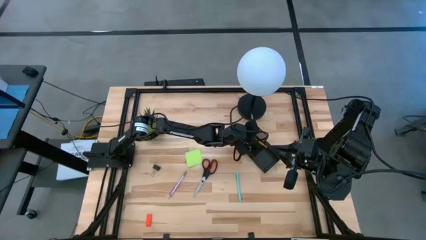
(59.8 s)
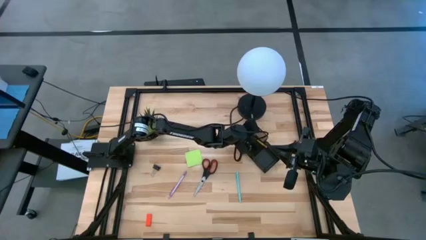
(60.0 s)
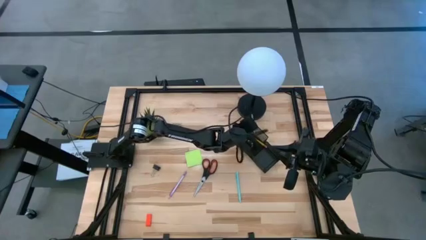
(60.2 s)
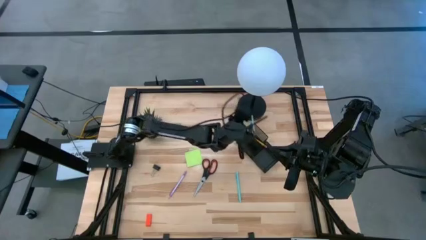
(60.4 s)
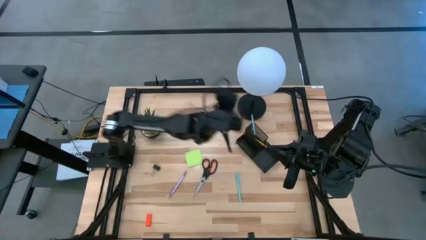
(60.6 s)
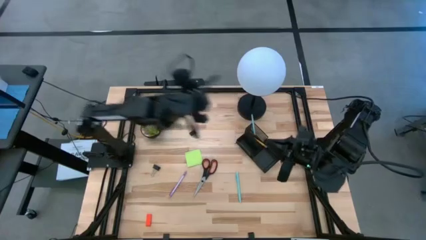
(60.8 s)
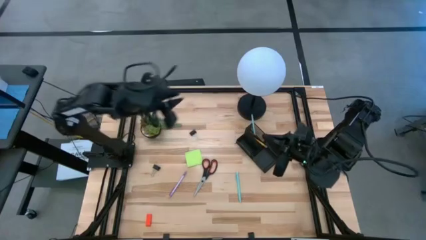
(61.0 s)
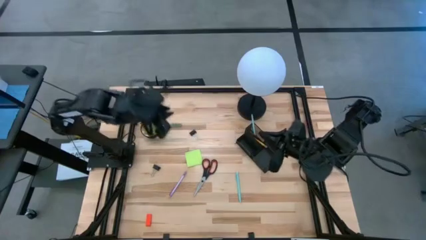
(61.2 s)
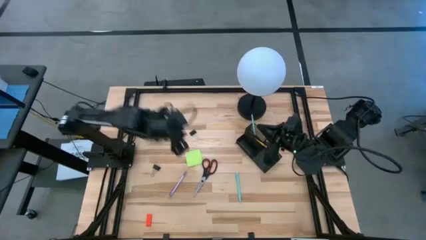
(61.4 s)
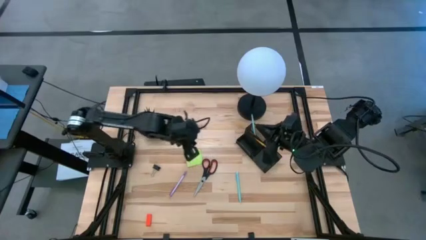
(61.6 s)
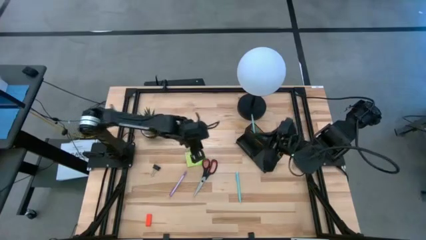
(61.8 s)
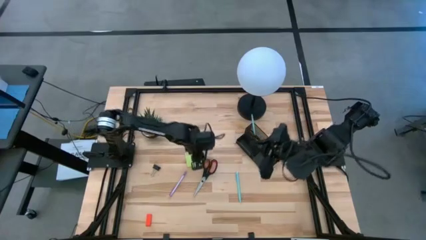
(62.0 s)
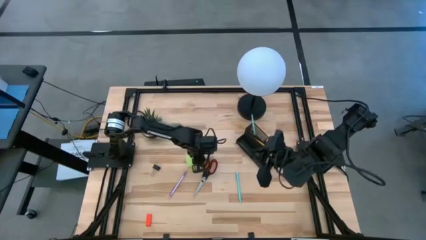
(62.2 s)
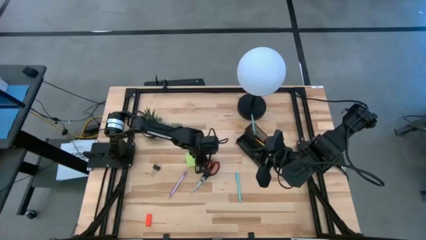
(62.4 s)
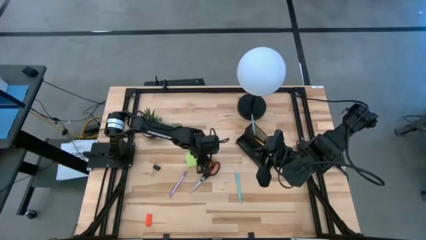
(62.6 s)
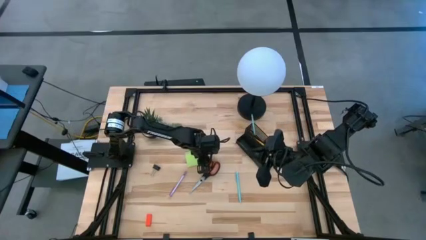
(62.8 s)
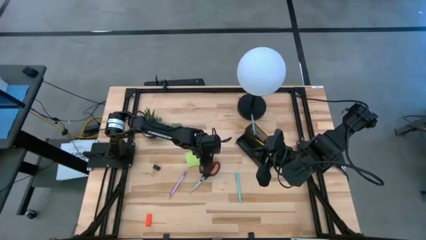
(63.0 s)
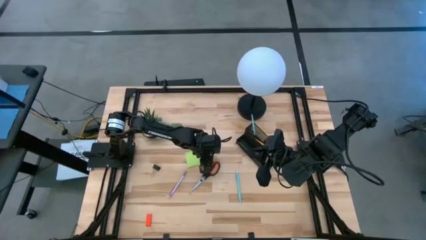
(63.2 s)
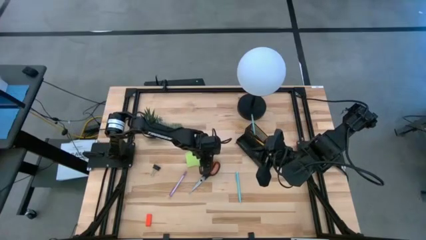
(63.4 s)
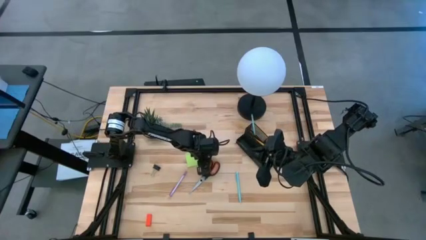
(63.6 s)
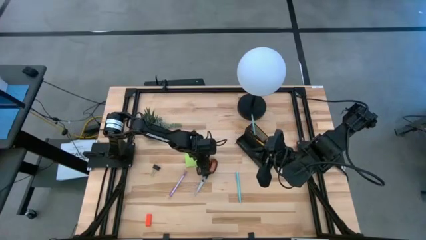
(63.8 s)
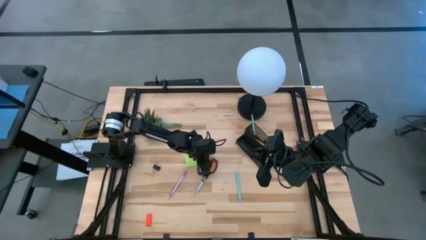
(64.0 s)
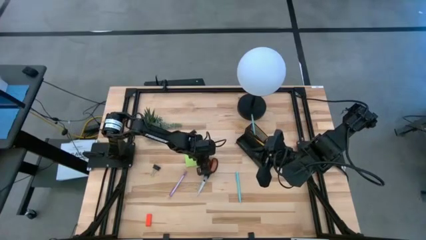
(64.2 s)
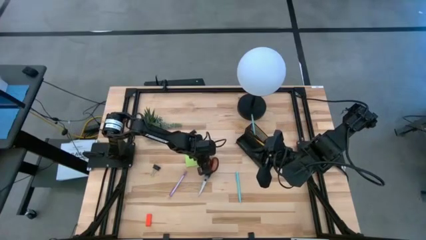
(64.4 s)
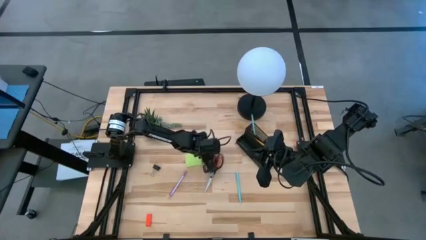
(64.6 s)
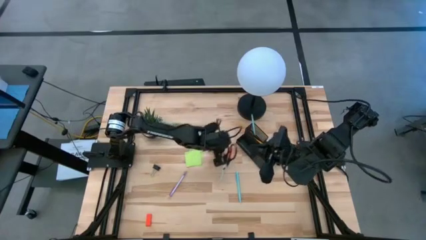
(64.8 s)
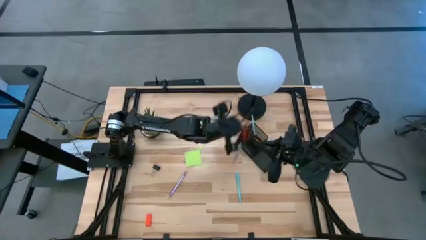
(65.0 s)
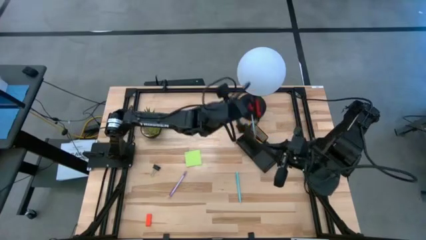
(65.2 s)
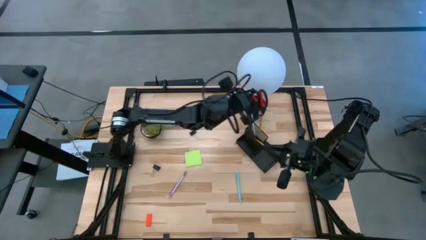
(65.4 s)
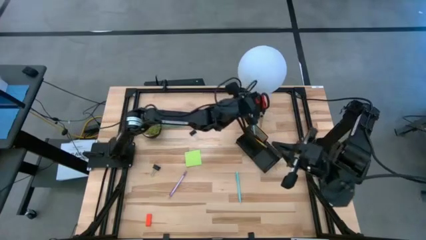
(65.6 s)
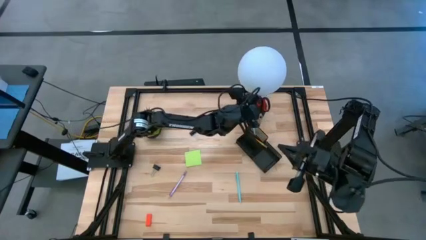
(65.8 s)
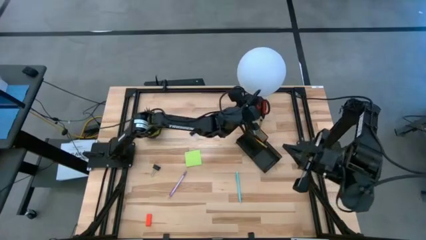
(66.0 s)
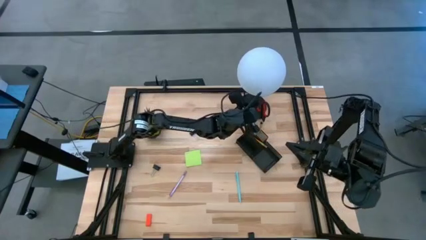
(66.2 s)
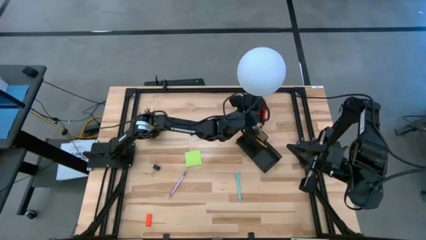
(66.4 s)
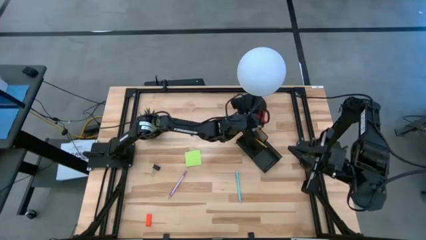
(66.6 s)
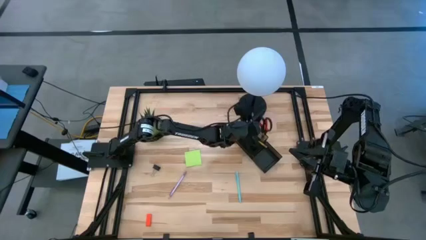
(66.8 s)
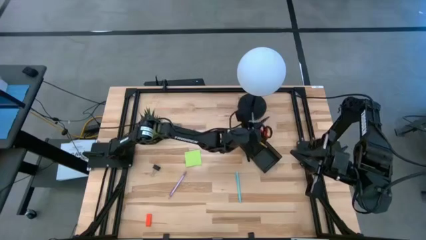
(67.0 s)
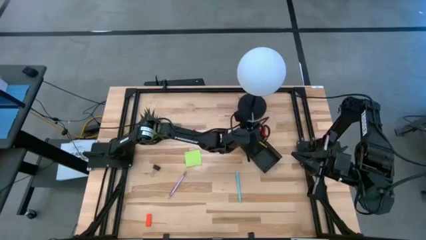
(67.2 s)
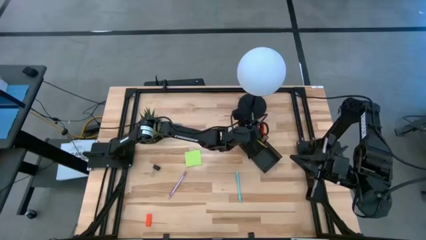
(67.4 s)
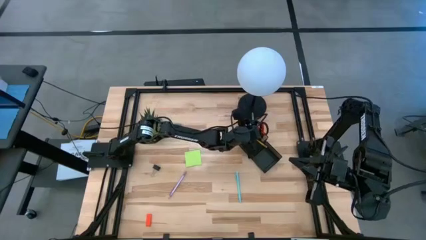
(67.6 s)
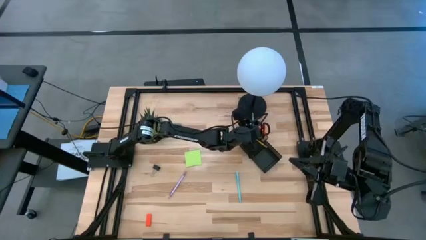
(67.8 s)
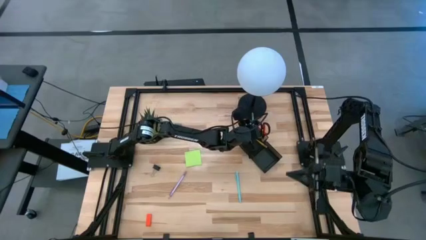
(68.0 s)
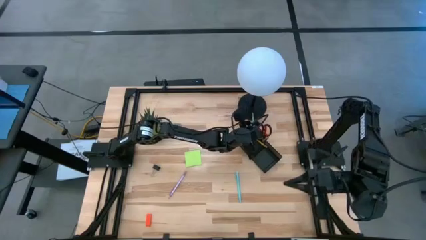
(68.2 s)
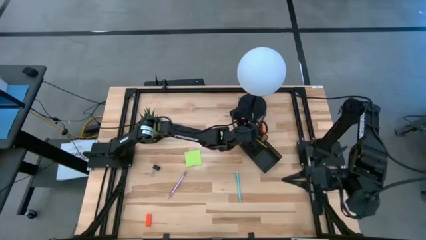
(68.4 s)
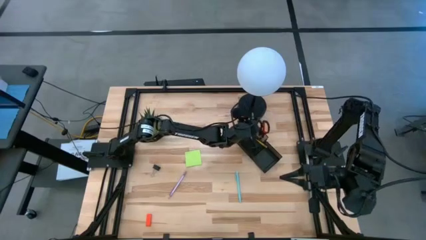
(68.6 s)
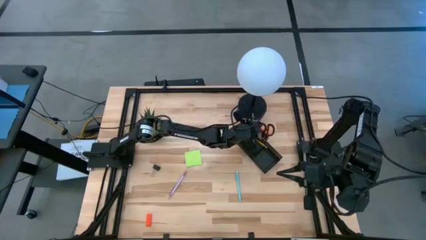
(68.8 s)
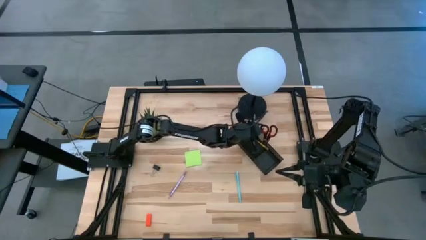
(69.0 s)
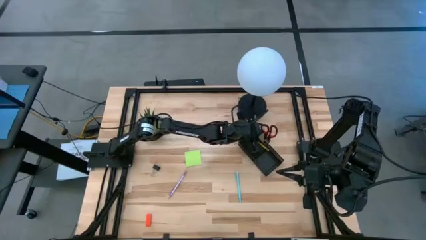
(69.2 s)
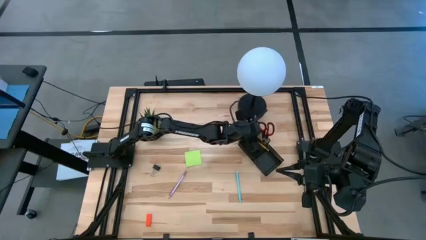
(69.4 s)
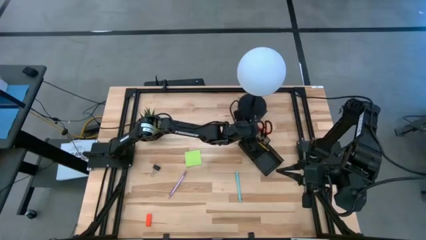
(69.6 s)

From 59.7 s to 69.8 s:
Task: Pick and place office supplies into organizer
Put the black scissors into the black desk organizer

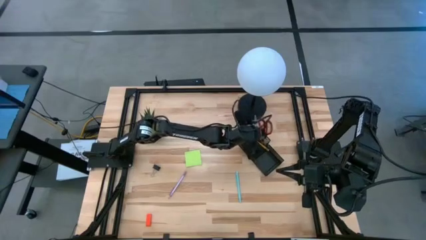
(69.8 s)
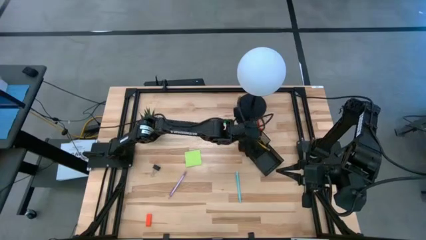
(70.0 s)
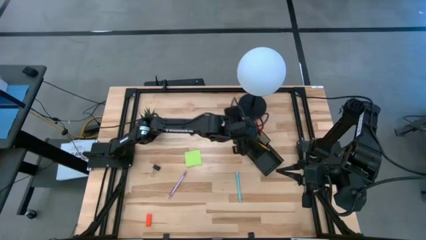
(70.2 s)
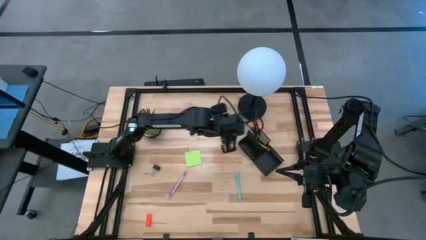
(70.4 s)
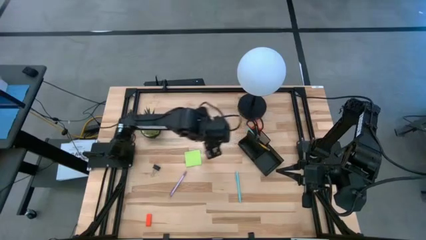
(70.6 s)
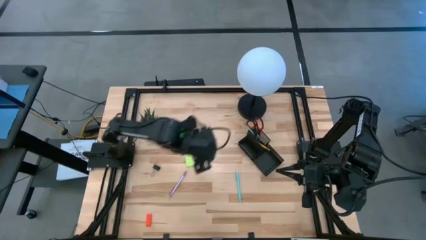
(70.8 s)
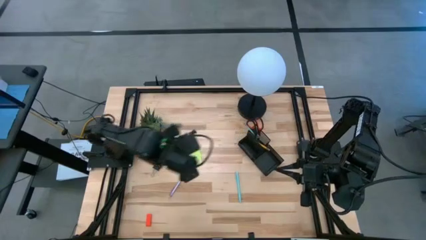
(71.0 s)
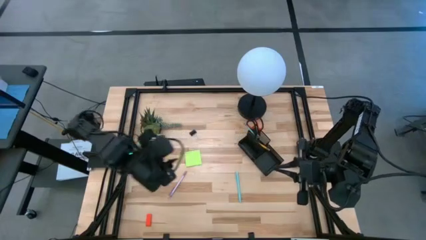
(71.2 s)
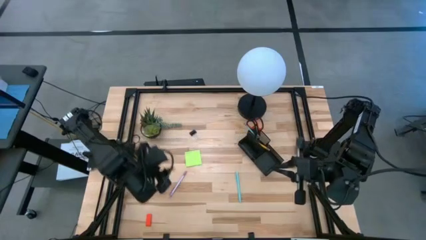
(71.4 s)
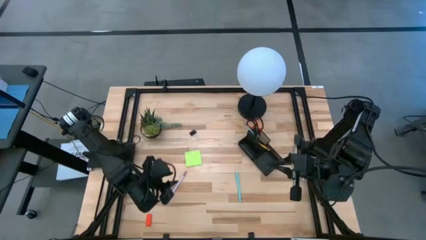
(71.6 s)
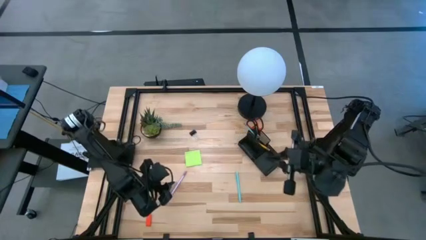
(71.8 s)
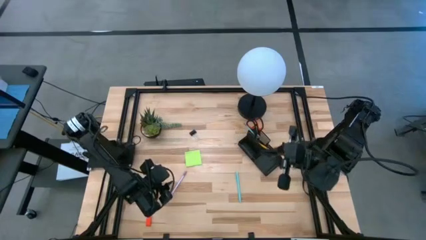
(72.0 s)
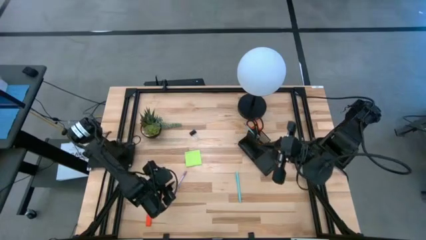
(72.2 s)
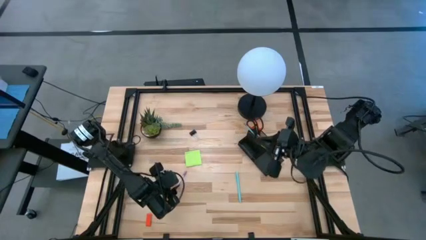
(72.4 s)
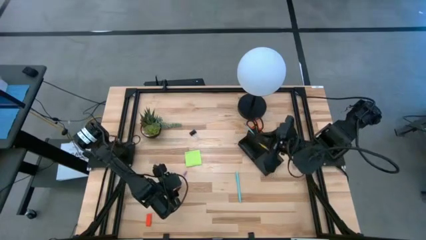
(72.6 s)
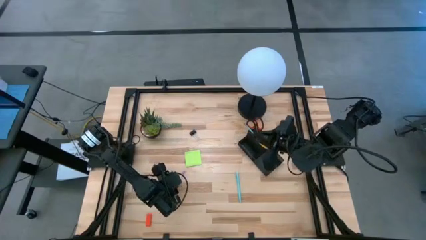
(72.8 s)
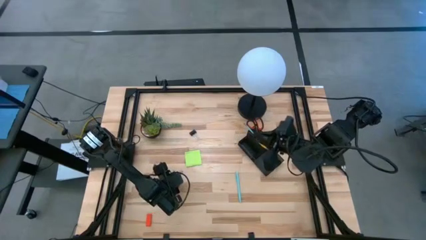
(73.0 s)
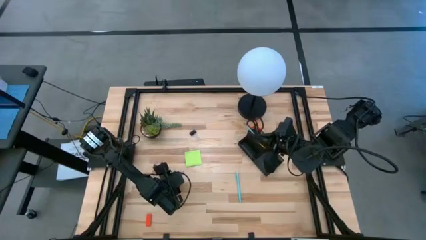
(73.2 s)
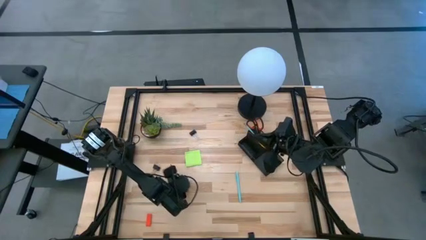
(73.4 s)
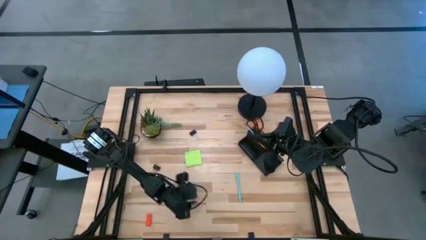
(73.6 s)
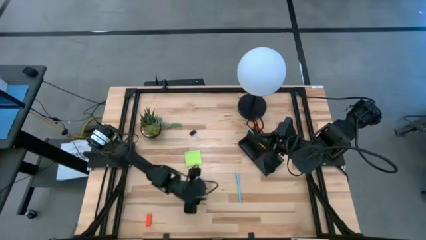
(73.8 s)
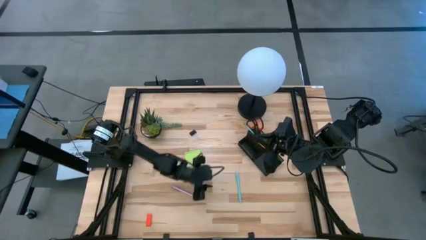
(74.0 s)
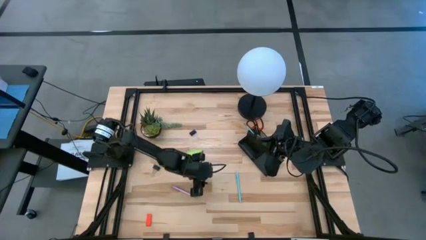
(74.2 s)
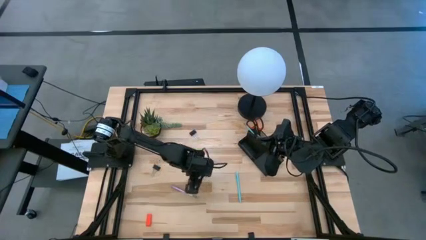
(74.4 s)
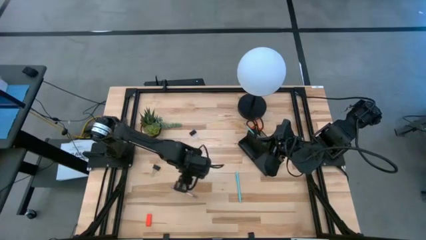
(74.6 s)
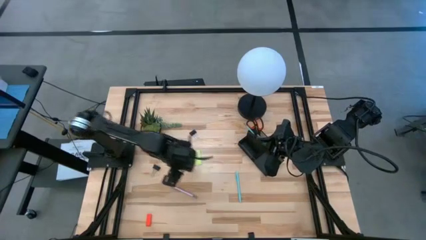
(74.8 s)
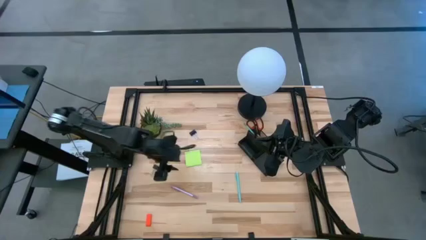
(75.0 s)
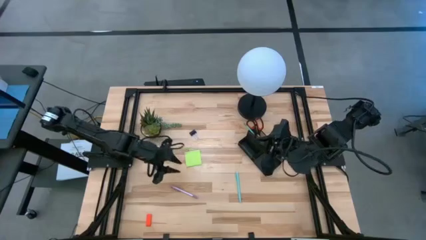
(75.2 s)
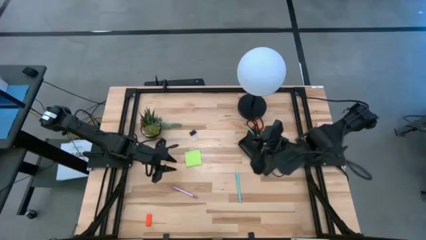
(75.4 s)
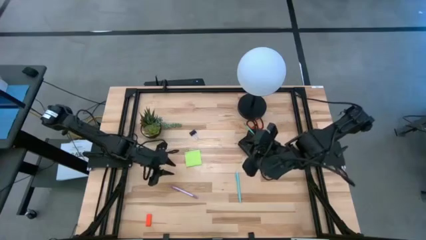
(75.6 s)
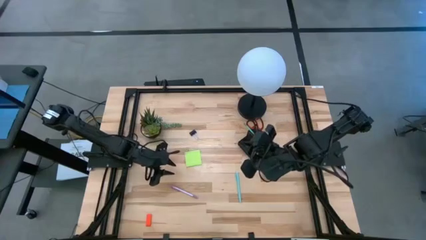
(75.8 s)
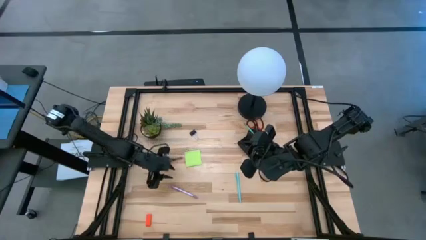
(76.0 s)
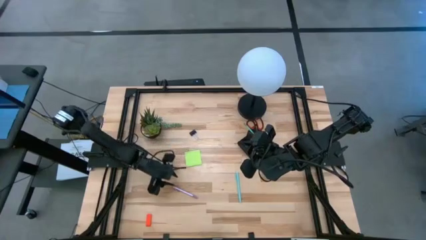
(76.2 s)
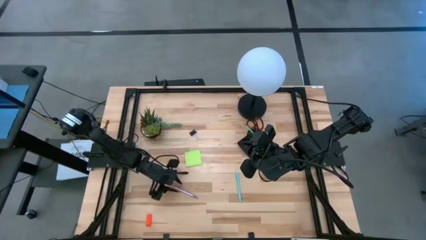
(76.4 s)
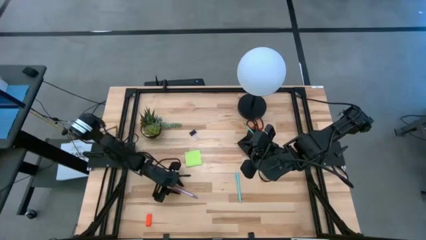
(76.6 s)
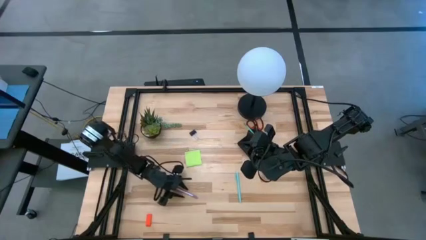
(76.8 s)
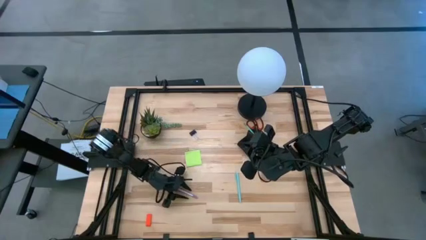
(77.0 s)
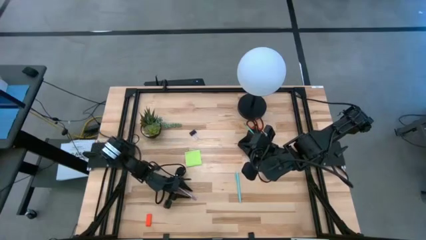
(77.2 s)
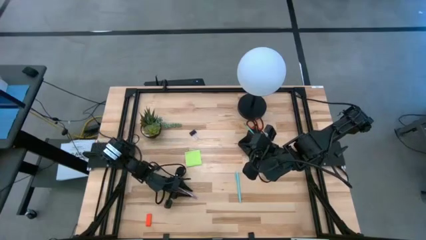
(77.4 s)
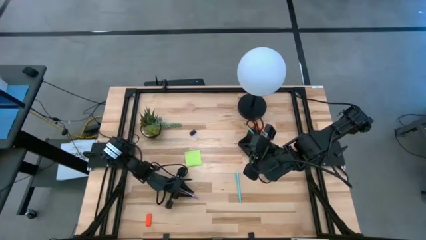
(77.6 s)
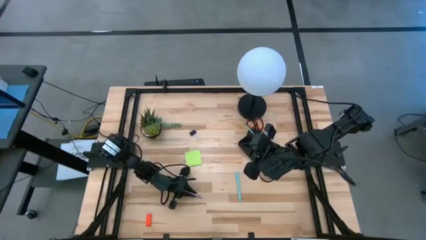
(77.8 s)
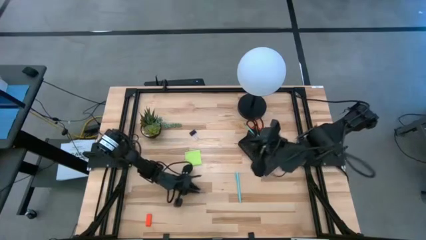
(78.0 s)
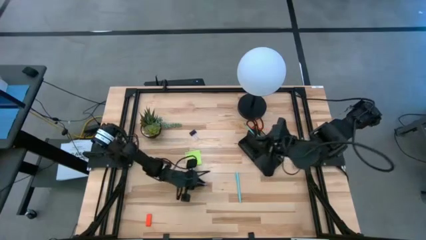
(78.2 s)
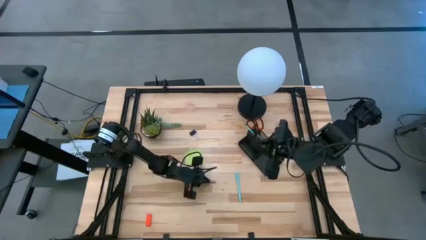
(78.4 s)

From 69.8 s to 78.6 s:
Put the purple pen into the black desk organizer
